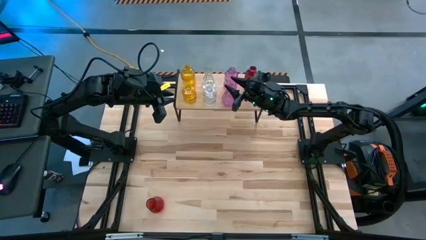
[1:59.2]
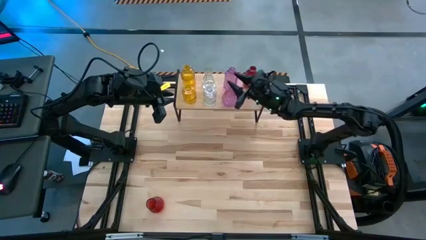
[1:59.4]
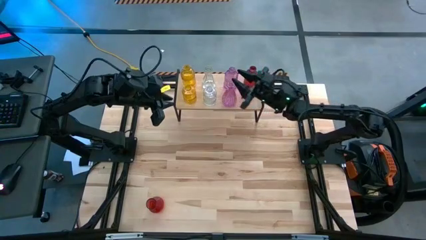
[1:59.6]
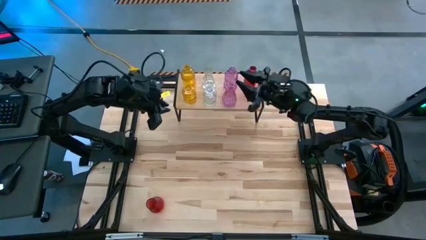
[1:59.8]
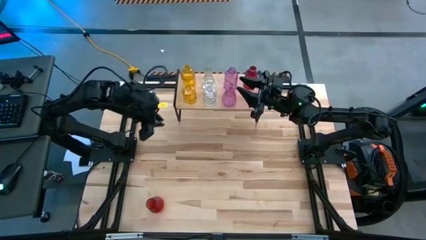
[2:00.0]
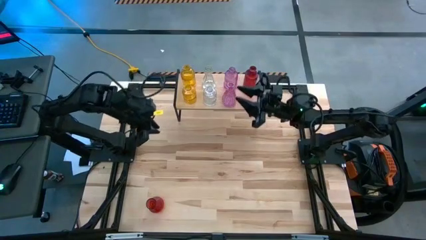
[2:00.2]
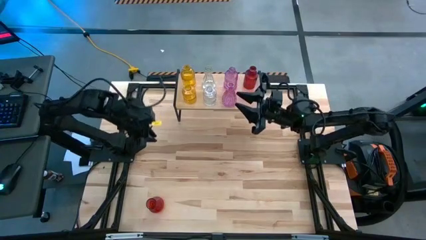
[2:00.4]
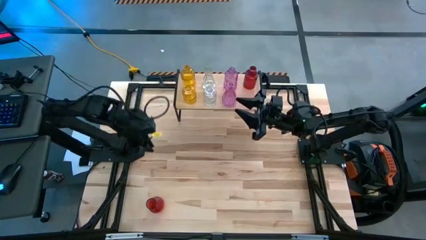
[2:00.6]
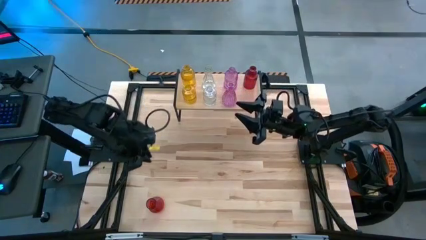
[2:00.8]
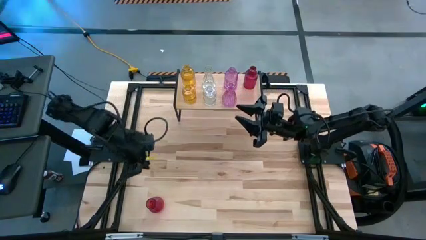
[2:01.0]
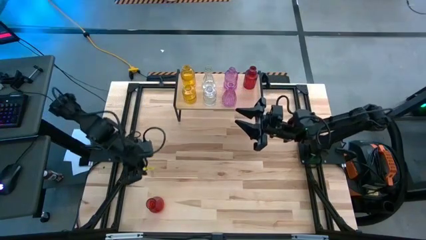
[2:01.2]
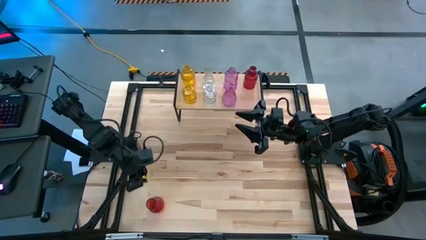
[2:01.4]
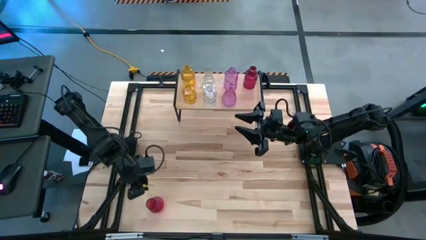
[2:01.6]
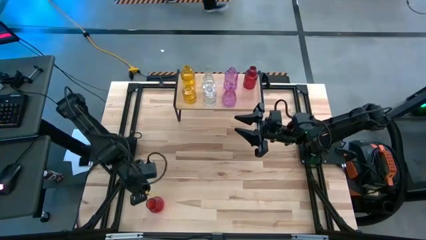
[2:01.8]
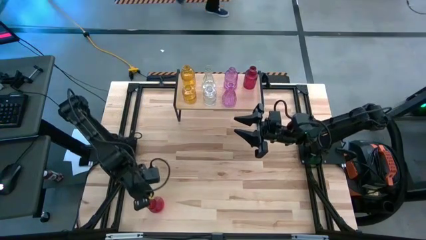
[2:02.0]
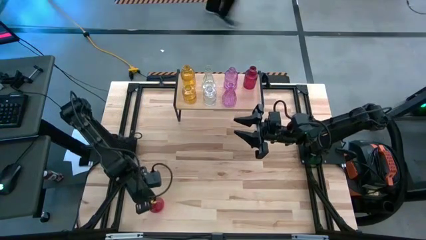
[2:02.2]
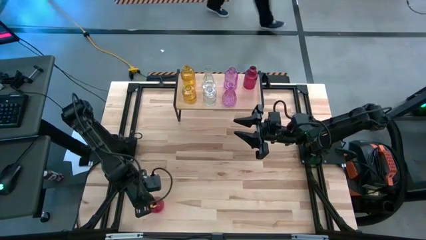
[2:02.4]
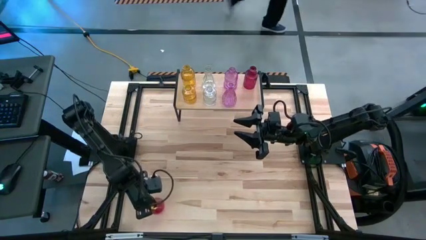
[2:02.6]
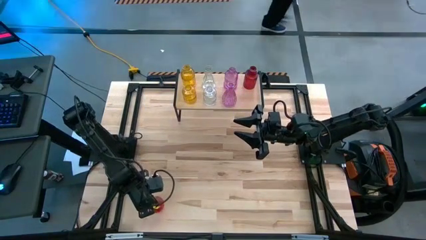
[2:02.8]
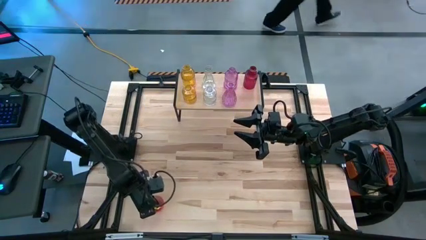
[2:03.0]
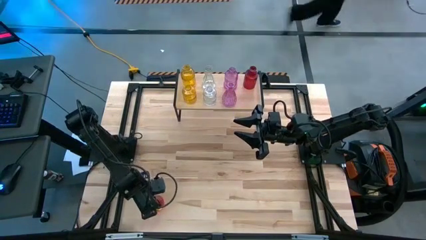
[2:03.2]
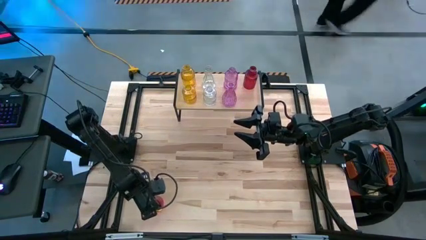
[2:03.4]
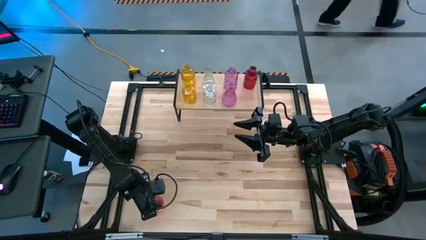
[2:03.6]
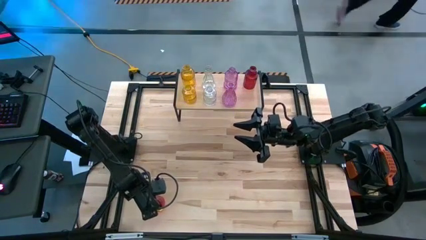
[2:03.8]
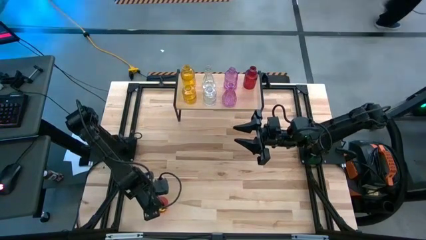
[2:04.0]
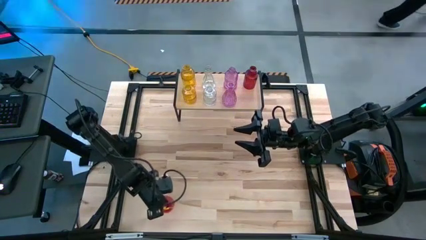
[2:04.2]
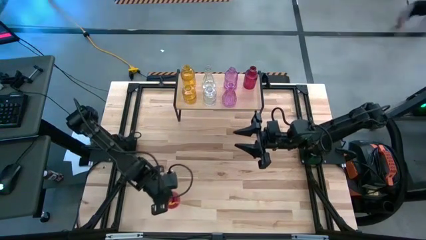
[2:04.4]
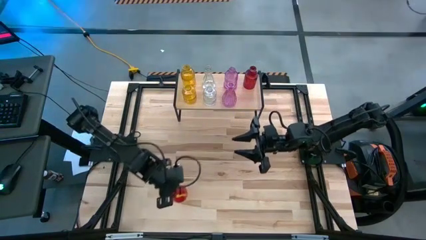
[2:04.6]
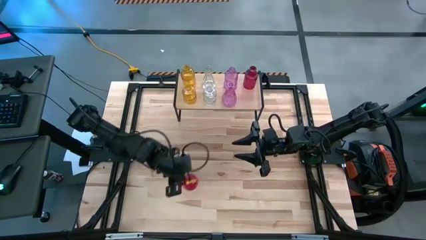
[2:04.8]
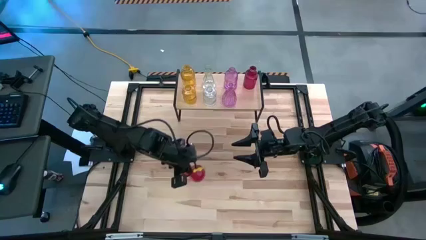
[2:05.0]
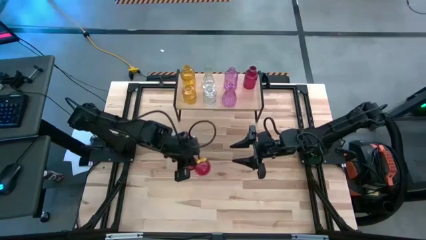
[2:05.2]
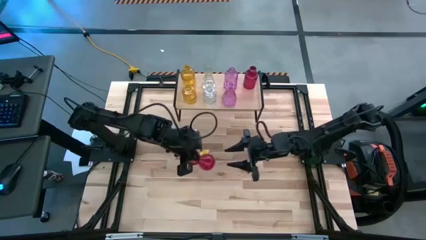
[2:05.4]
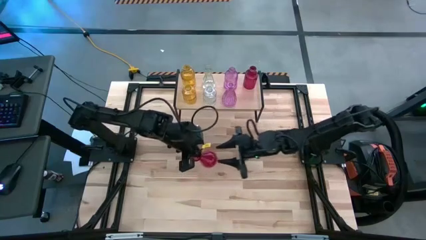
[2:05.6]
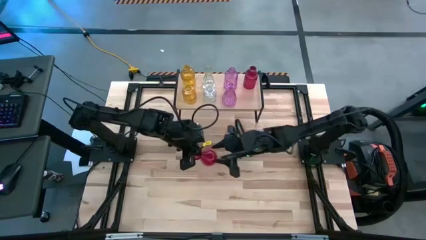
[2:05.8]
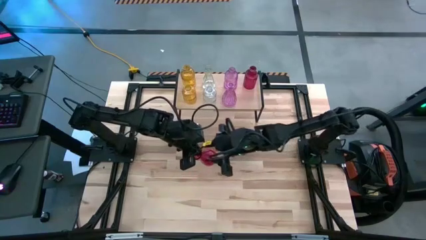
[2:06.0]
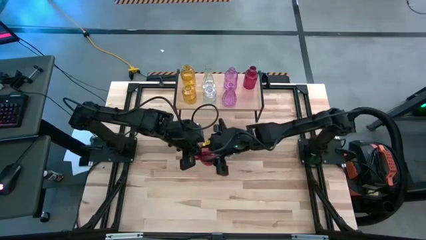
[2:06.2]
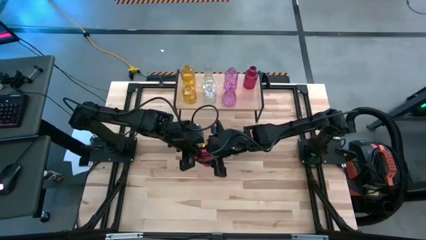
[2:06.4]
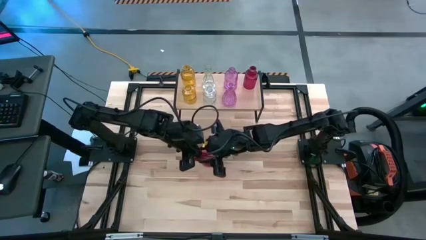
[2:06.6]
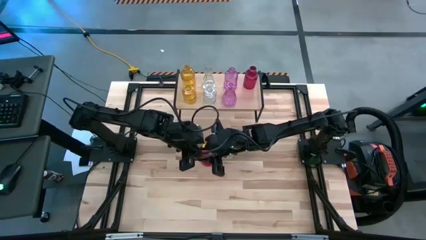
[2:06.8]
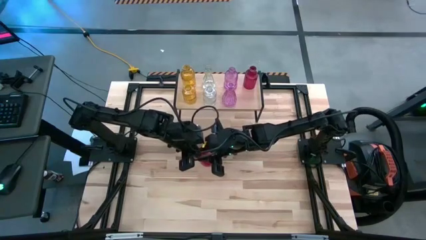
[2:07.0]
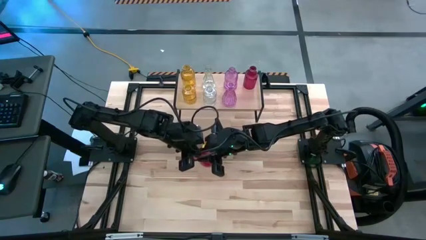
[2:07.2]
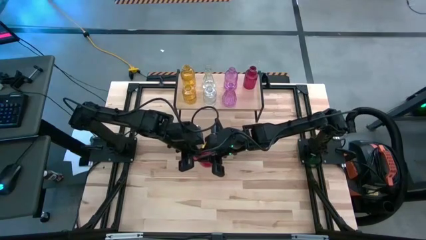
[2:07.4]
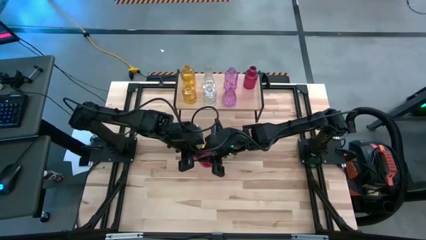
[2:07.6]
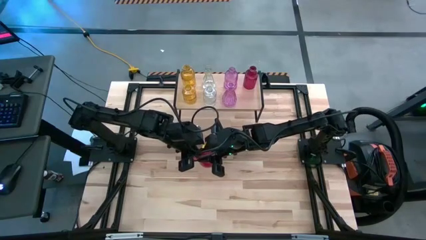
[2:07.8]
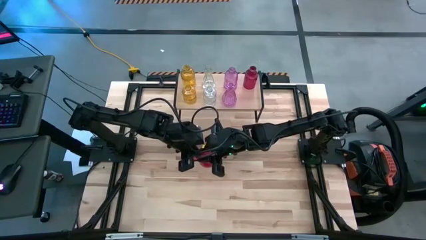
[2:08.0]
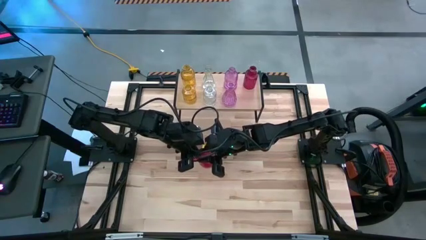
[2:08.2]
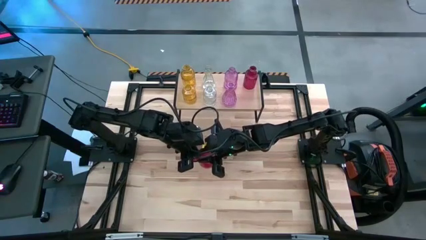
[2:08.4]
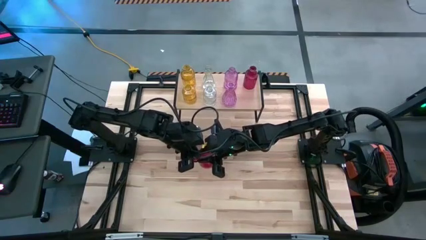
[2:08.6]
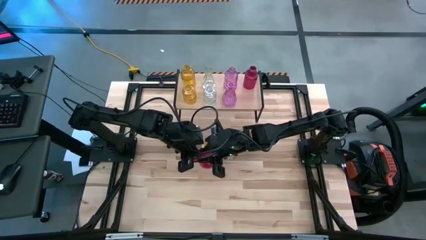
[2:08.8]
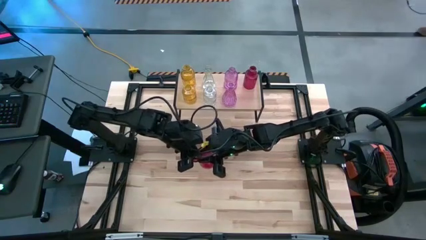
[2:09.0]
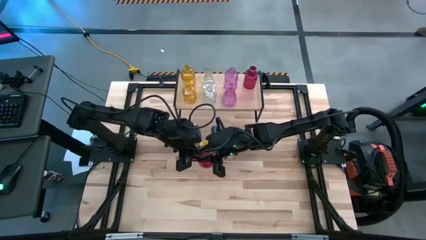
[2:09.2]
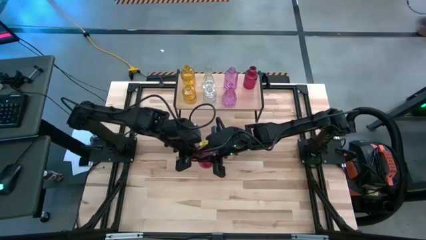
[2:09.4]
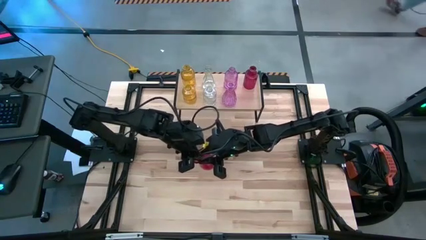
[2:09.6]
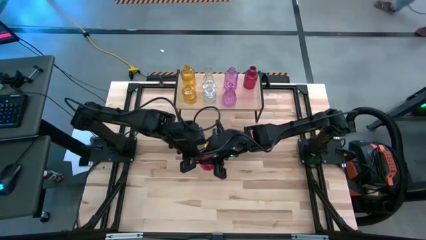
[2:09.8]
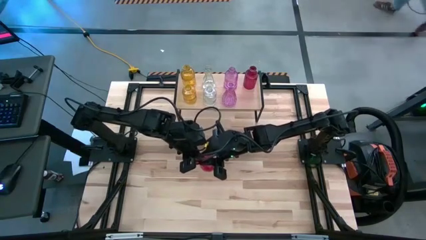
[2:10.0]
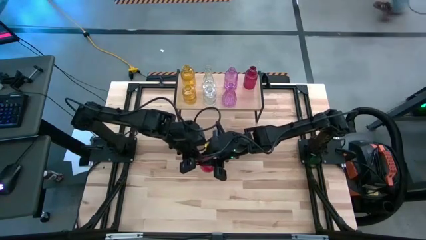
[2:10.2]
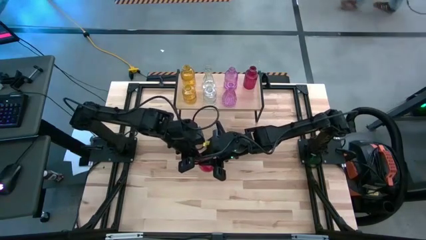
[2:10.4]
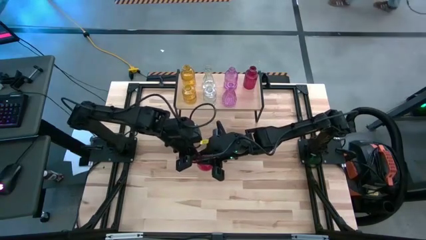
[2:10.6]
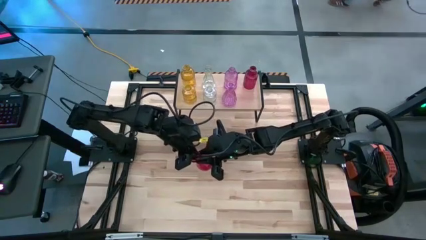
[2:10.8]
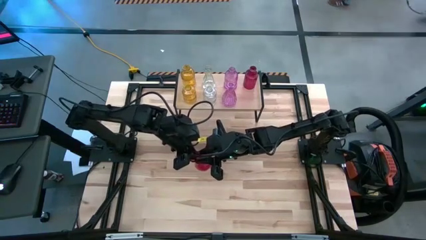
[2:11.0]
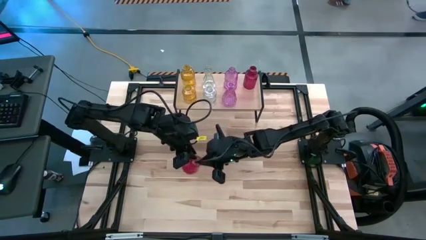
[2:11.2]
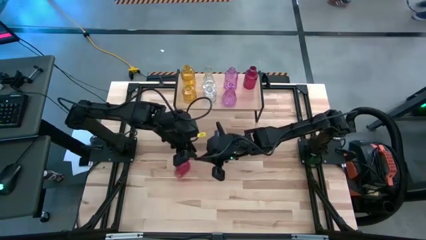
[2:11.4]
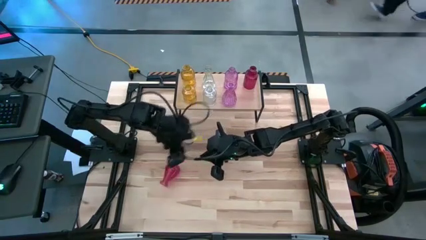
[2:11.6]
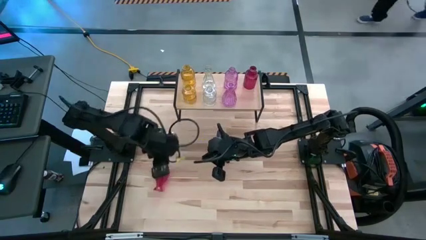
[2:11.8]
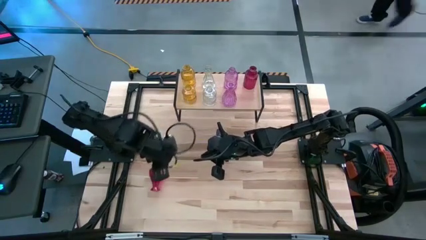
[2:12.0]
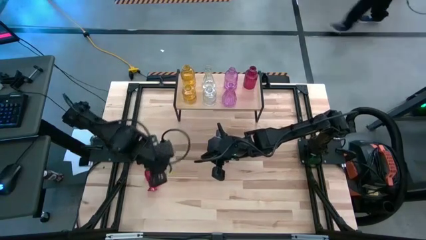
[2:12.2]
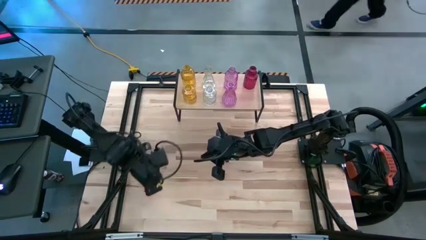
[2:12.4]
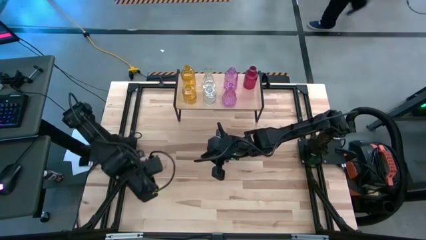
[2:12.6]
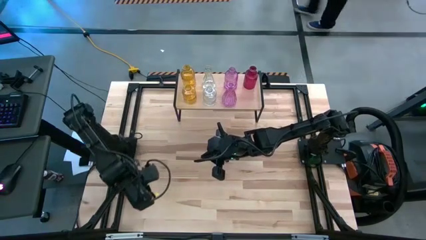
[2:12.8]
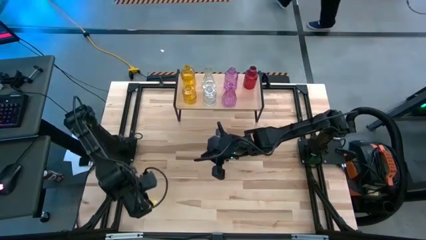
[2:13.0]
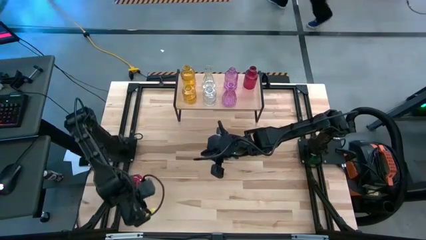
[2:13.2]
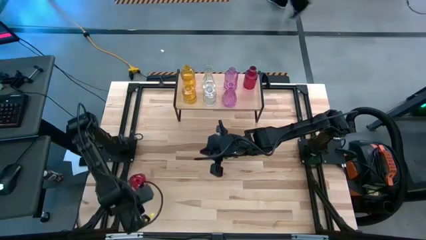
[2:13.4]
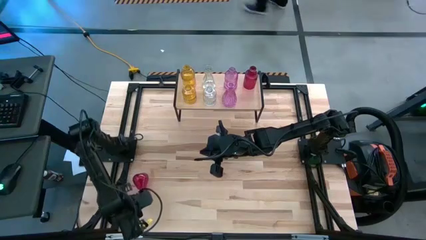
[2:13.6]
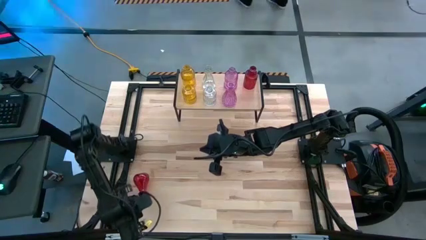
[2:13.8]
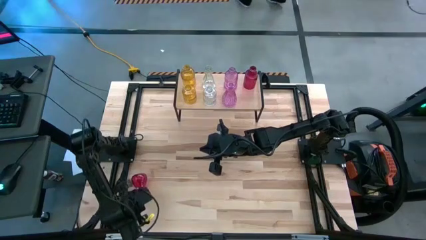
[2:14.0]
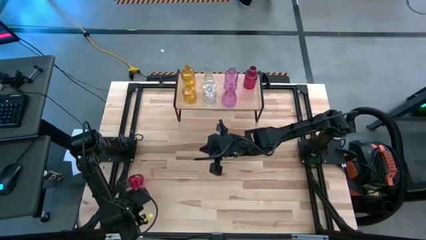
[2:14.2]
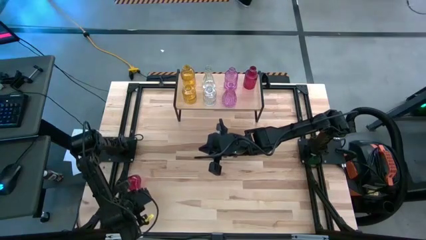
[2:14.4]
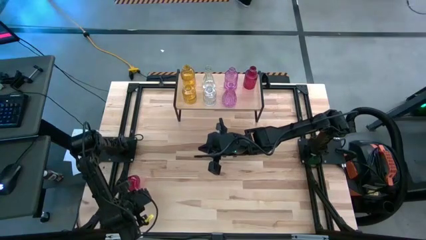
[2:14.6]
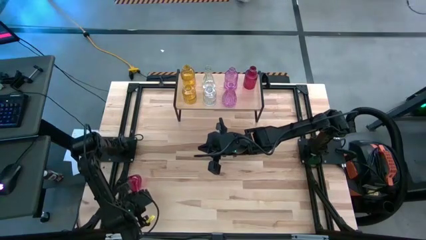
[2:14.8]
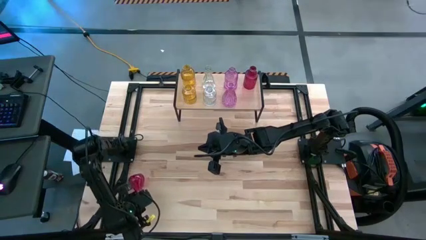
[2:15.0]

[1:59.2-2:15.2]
Task: sort vases onto shelf
Put the red vase on the shelf aligned with the other red vase

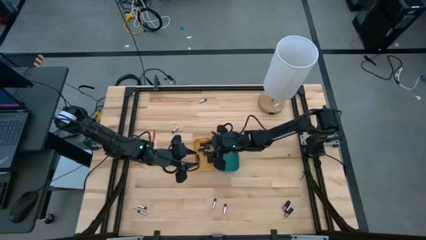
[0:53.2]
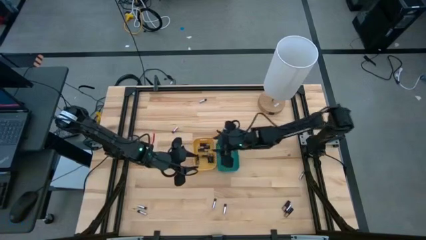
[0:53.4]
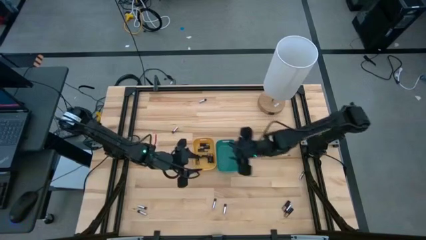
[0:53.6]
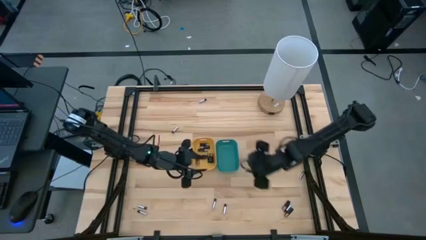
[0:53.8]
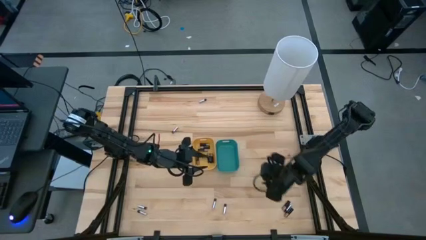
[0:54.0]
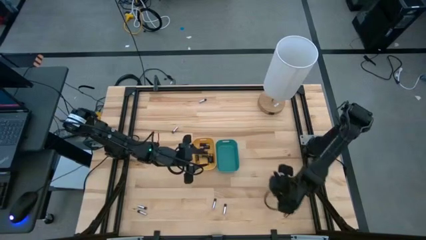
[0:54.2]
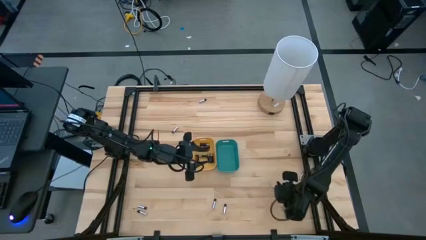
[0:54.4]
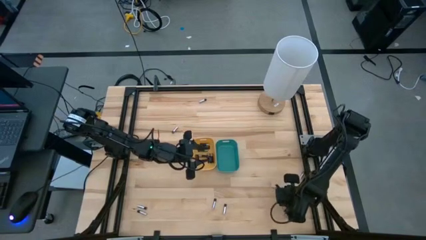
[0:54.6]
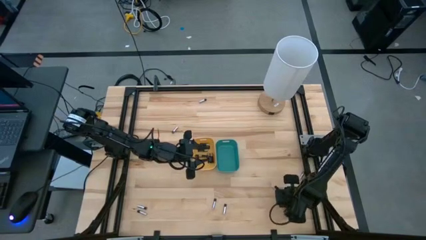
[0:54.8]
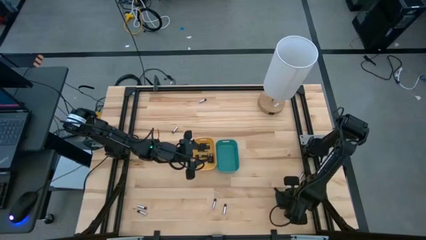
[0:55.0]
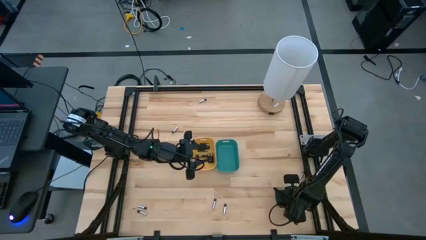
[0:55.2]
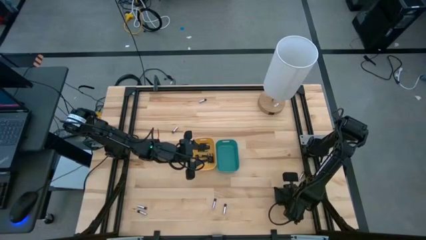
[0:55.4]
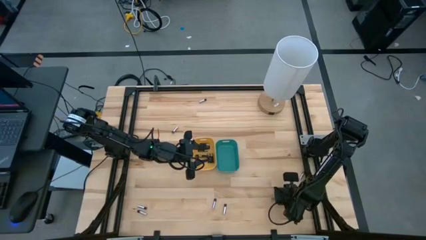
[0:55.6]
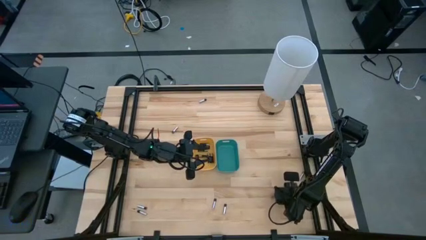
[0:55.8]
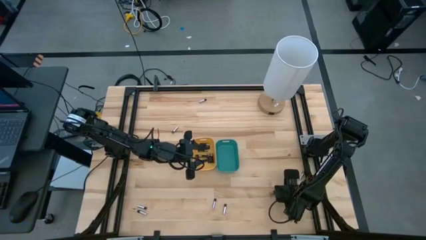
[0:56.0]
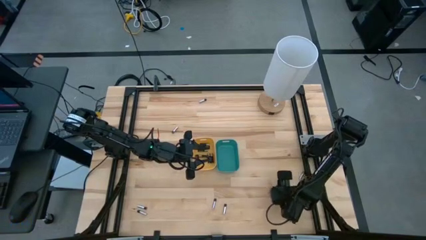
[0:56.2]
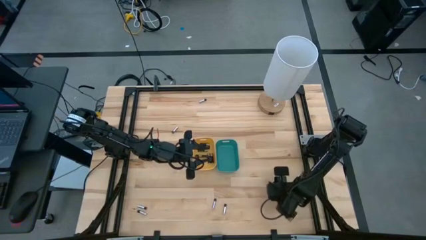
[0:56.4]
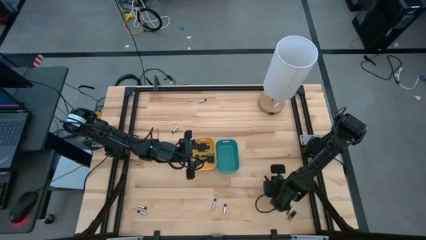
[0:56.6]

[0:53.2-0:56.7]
Task: Sort batteries
Put the black battery into the yellow bin
